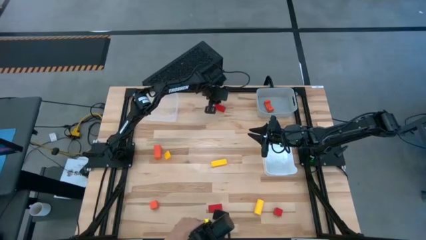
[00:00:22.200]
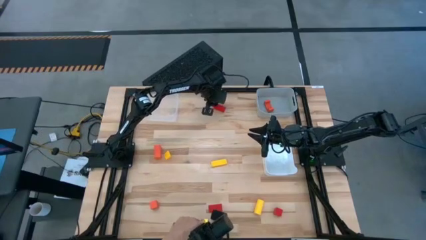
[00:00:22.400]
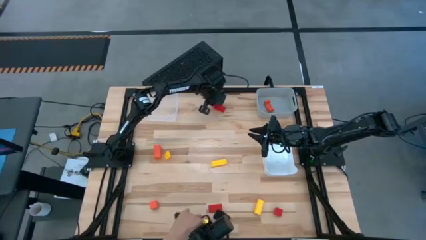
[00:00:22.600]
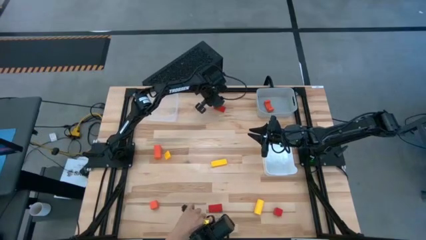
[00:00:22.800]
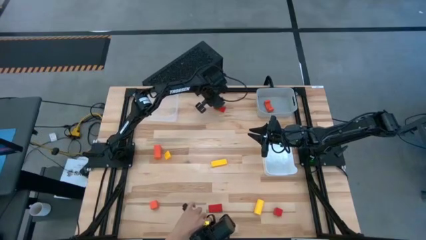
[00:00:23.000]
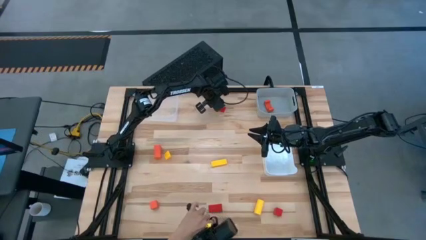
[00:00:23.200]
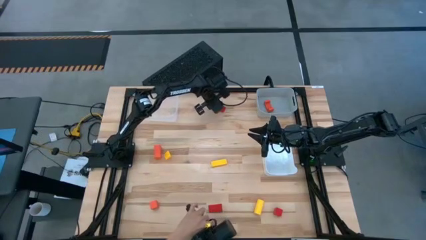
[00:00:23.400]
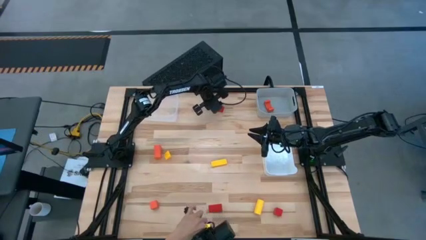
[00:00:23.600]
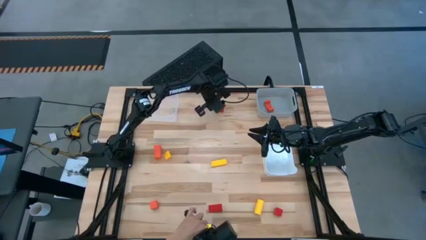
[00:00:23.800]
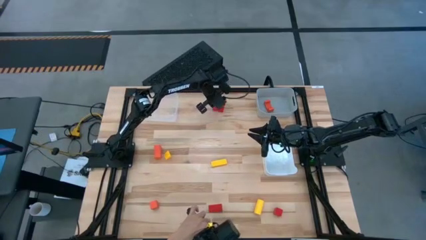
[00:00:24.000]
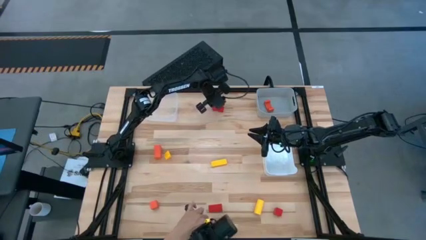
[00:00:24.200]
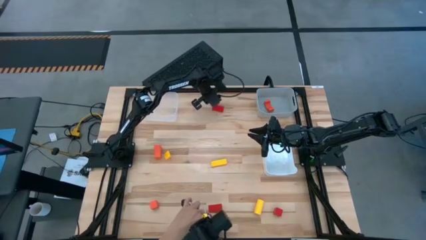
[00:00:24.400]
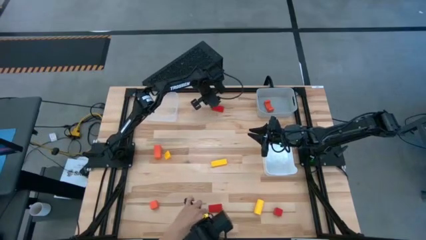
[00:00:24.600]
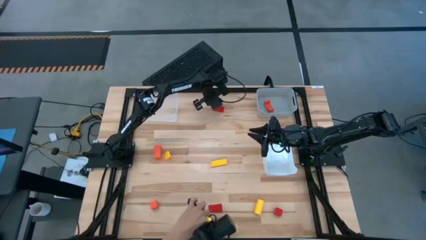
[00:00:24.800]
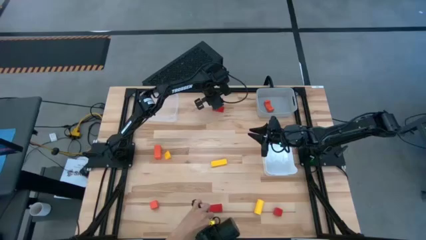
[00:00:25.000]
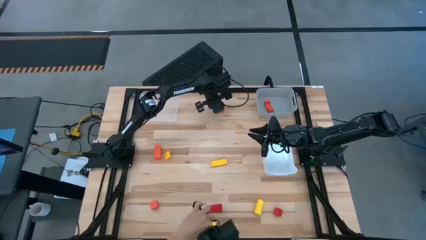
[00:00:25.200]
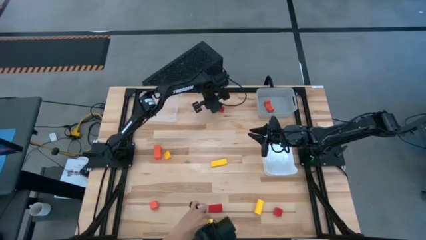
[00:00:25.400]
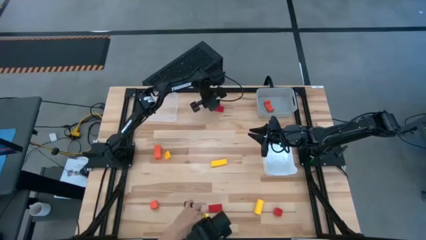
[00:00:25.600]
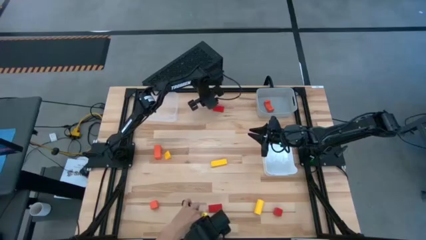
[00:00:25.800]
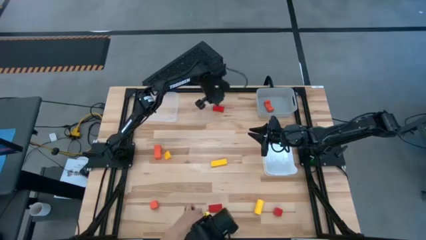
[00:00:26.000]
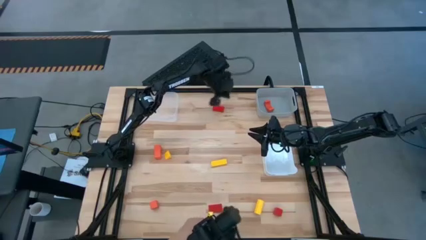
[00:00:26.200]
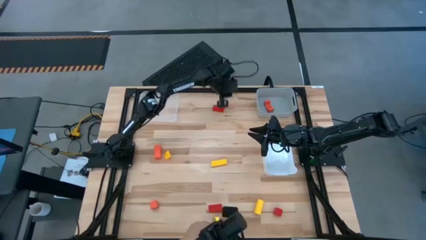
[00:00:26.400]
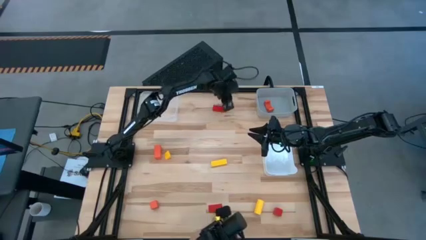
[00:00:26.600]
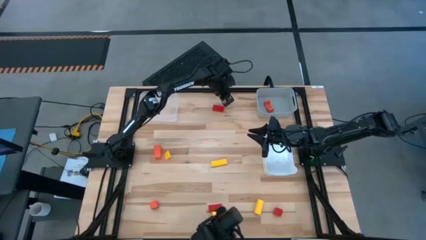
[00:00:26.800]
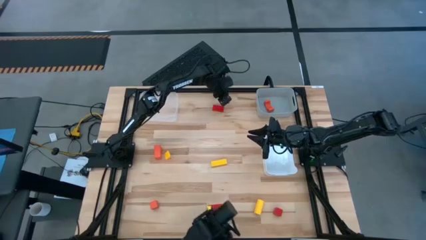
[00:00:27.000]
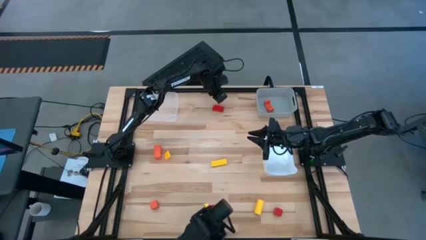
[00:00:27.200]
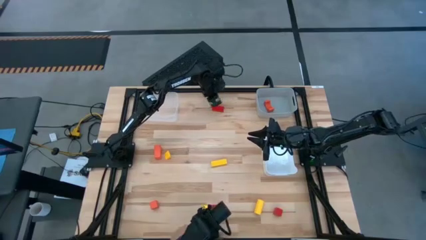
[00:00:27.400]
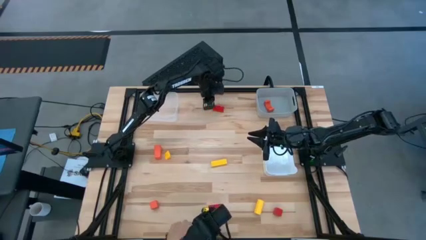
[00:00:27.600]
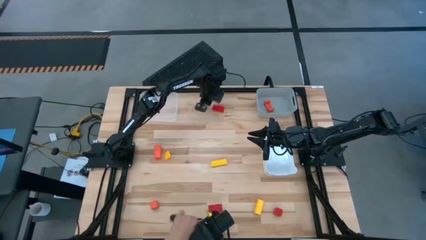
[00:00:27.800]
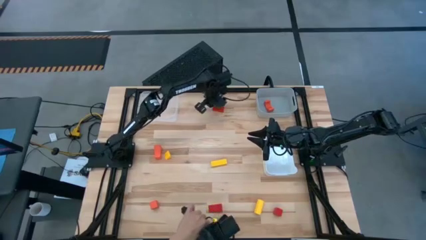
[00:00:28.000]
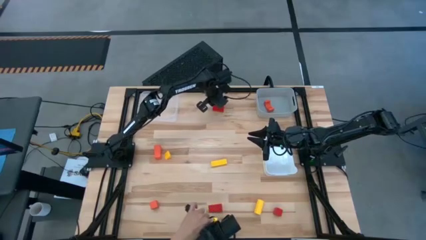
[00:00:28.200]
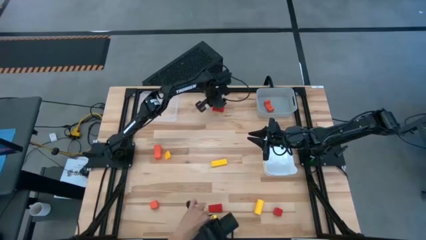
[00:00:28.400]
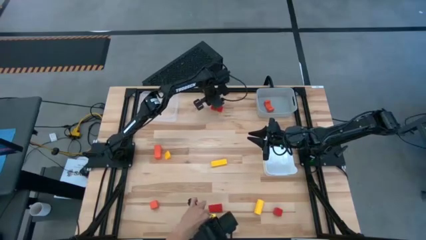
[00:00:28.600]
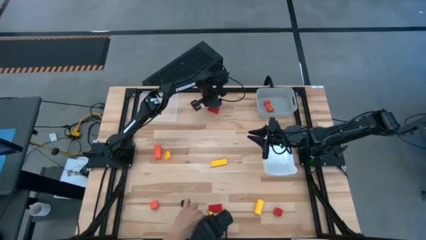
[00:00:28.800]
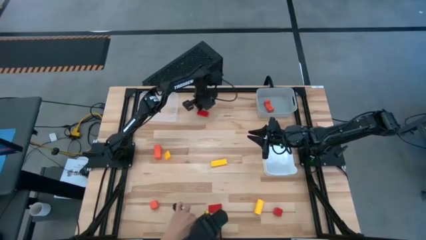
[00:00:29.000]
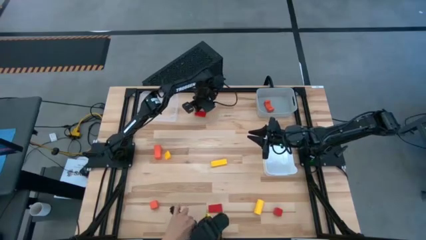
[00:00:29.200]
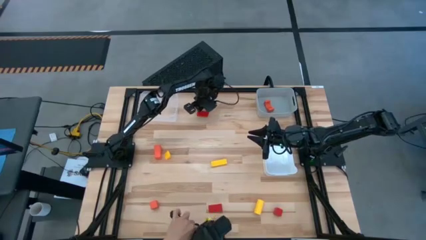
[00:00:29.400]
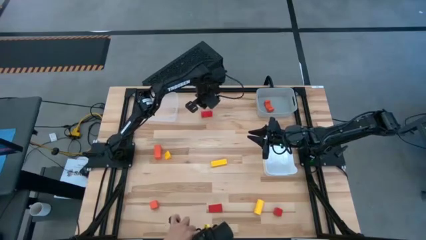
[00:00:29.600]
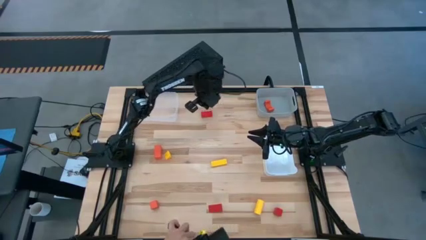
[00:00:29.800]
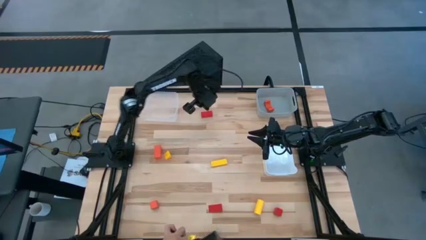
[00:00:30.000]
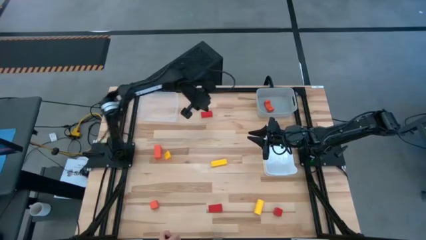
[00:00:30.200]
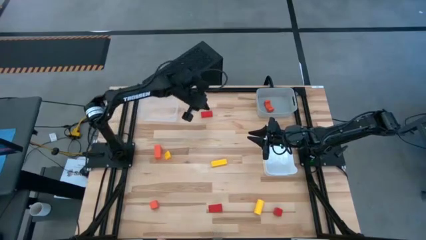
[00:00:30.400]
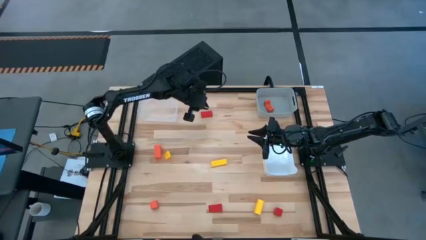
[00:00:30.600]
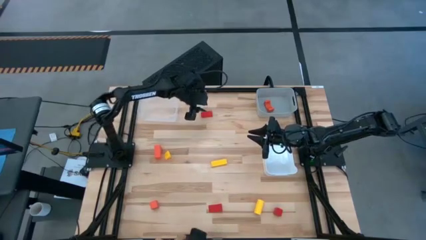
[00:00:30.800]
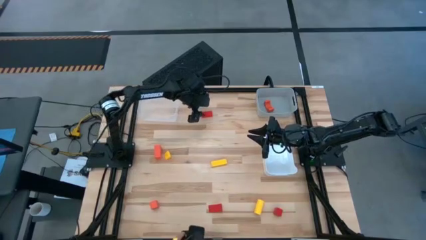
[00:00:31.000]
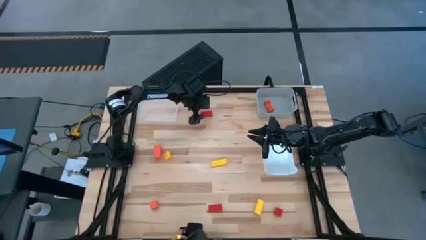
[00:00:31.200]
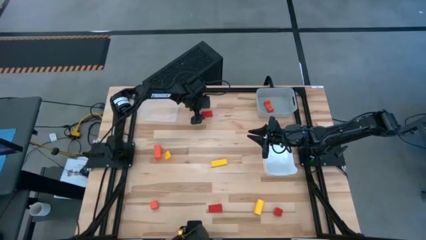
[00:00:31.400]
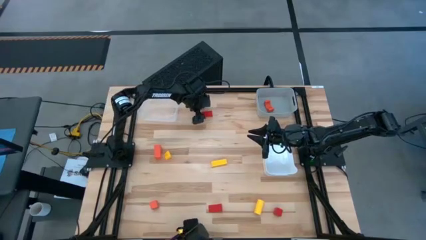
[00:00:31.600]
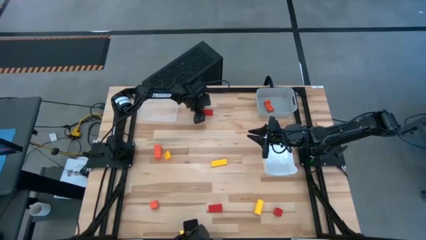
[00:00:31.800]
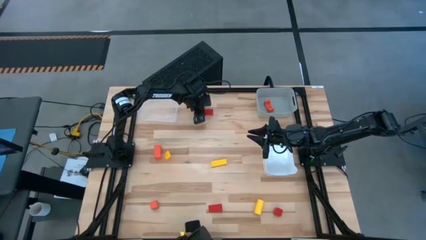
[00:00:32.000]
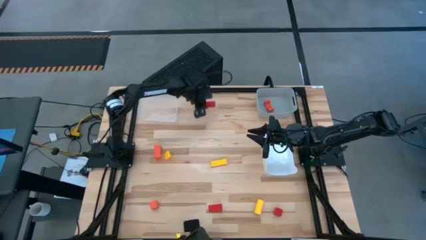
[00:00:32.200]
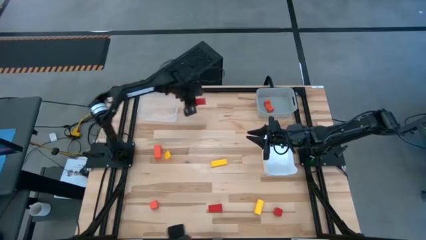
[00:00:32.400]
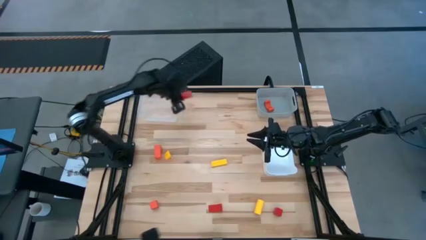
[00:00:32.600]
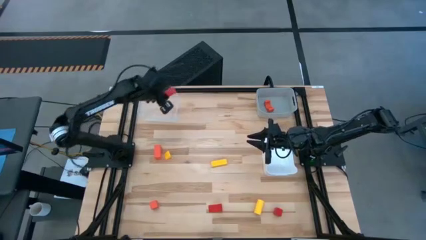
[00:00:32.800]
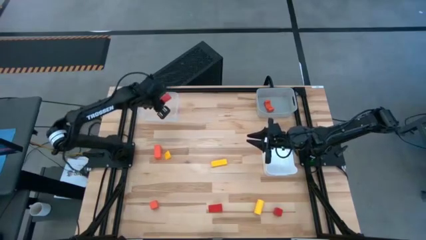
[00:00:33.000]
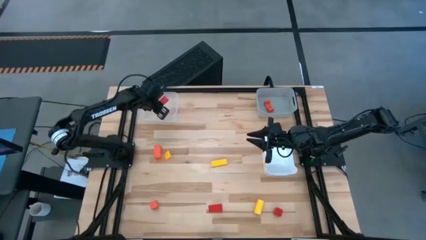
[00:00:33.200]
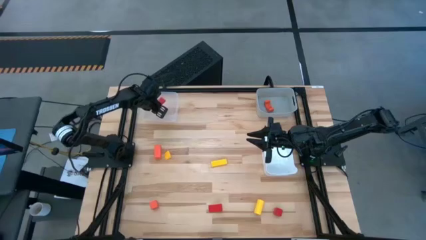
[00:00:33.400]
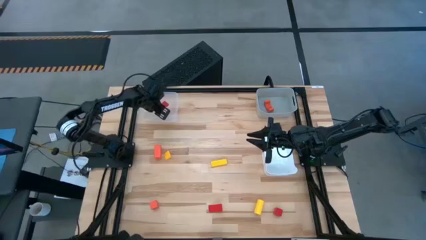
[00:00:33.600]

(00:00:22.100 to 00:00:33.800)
Task: Sort & place blocks by color
Put the top left red block into the transparent bin

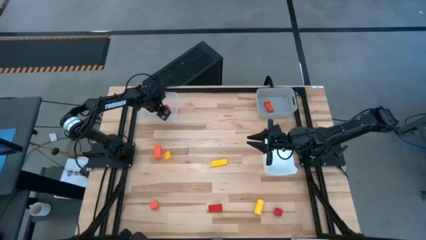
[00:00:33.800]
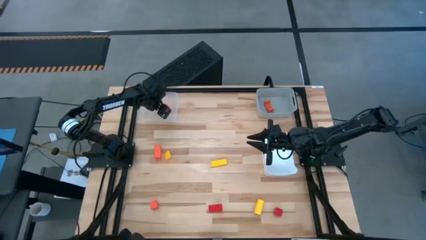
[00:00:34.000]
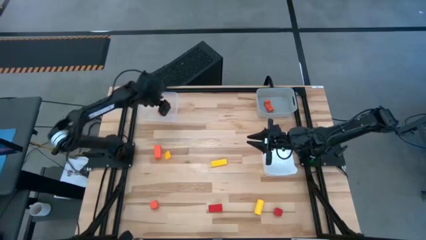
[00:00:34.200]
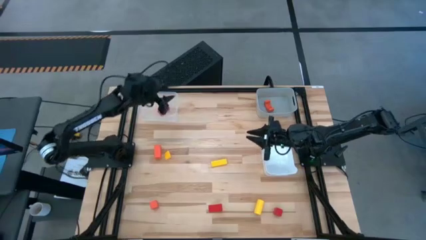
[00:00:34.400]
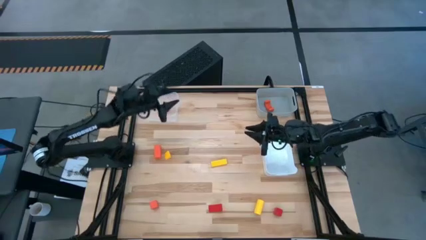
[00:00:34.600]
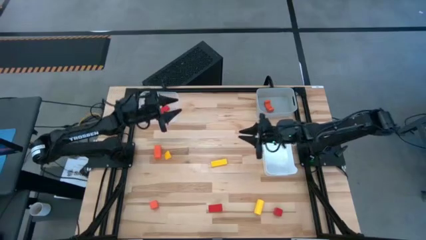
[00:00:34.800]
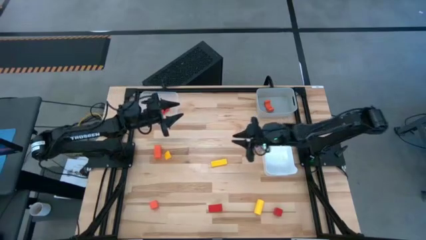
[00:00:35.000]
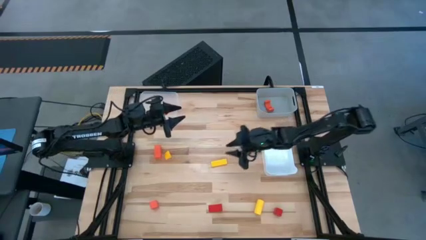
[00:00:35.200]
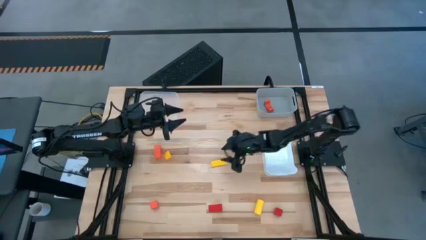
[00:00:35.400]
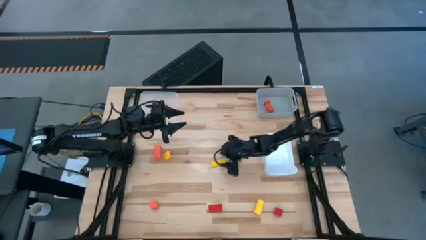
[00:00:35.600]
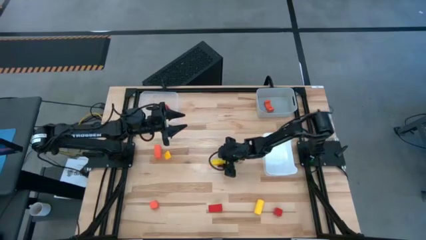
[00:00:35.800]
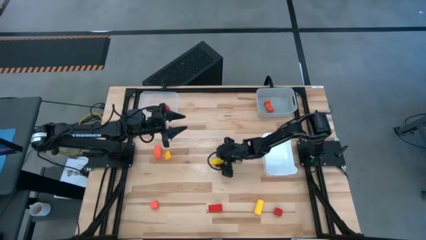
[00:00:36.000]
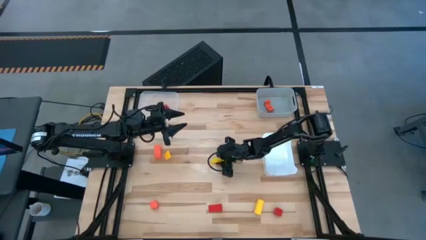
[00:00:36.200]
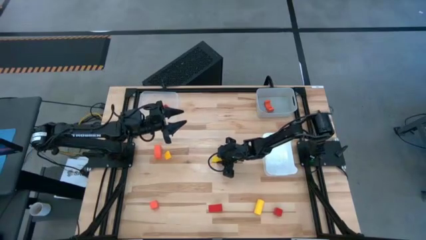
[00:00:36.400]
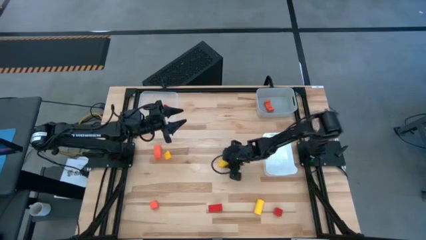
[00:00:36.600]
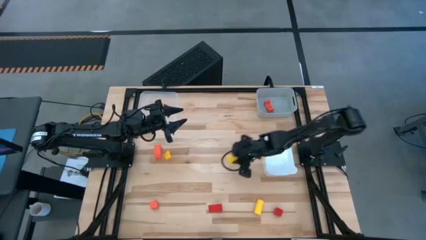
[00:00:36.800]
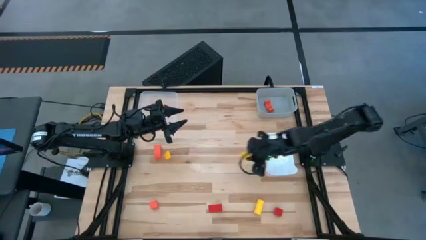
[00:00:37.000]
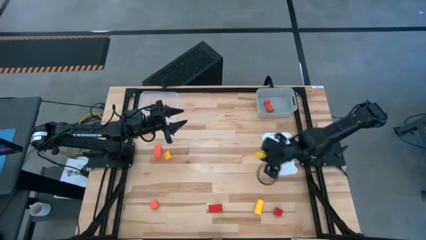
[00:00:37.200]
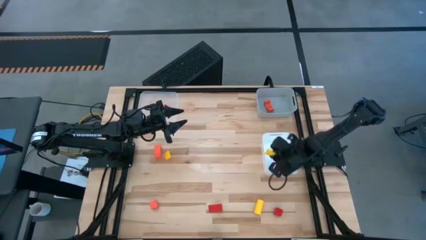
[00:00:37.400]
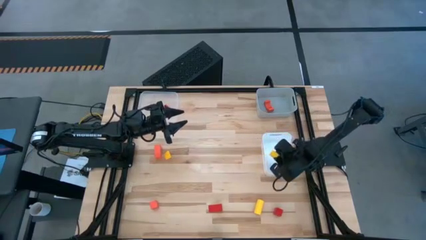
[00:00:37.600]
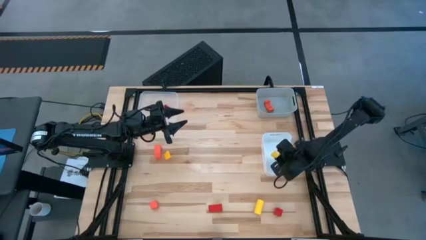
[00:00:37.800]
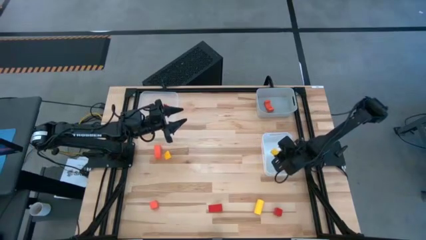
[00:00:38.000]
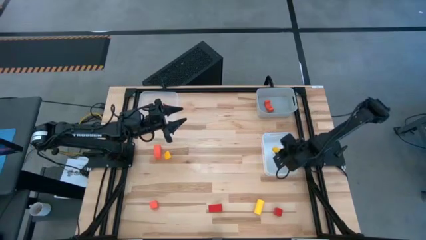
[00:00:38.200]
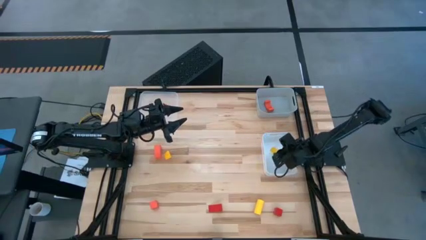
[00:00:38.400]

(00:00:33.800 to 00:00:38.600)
Put the middle yellow block into the white bin
